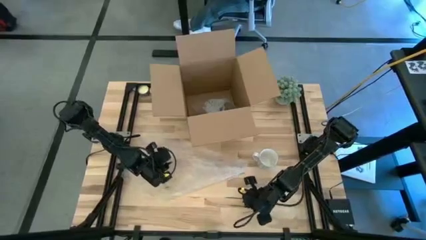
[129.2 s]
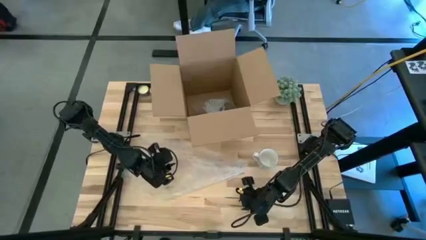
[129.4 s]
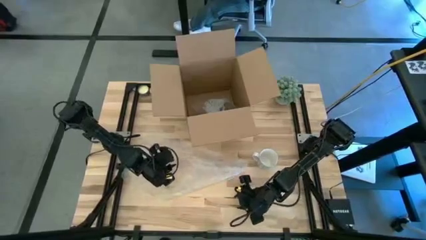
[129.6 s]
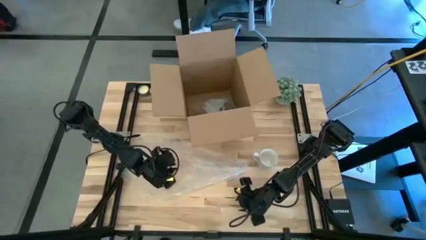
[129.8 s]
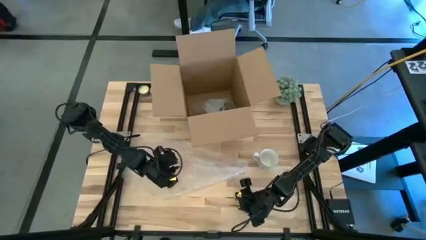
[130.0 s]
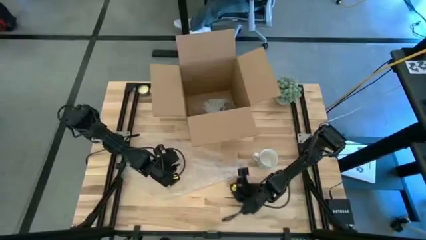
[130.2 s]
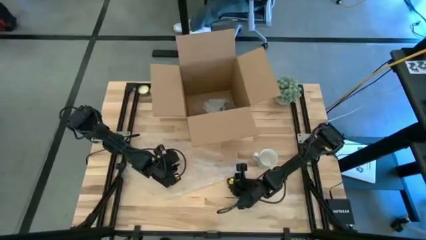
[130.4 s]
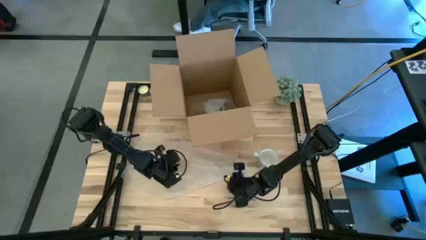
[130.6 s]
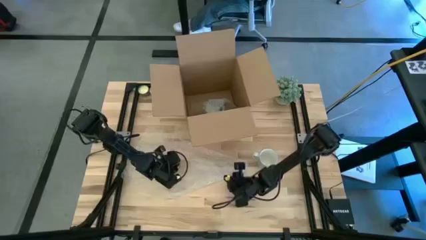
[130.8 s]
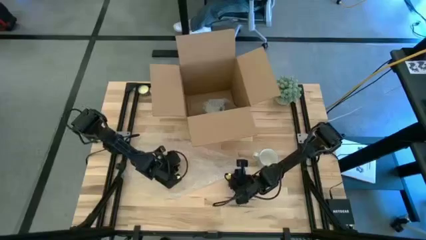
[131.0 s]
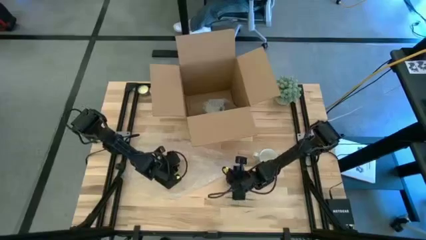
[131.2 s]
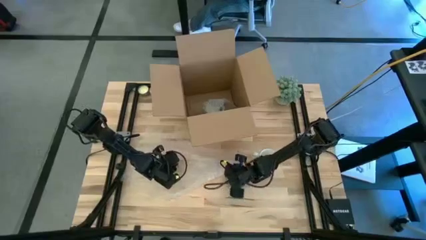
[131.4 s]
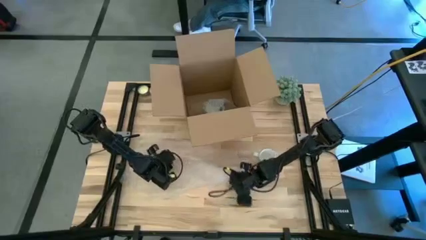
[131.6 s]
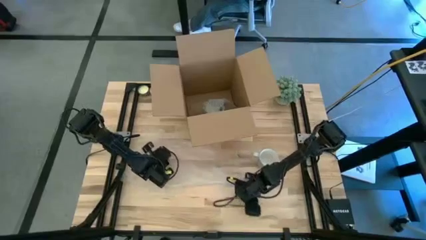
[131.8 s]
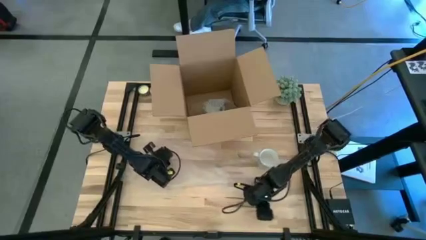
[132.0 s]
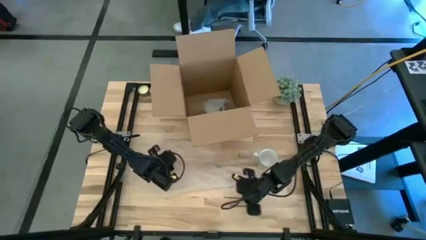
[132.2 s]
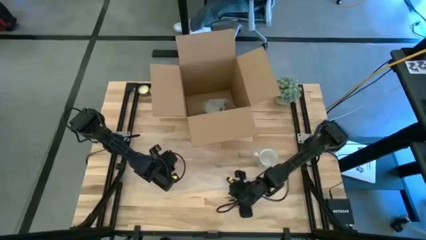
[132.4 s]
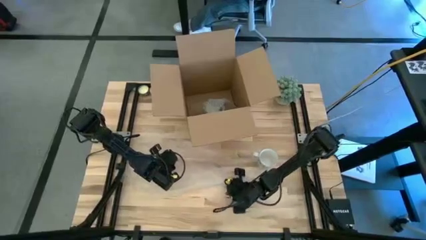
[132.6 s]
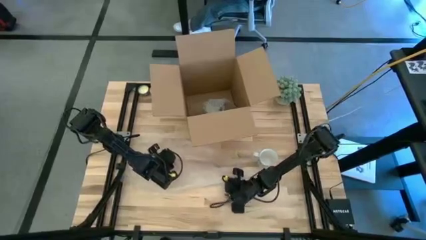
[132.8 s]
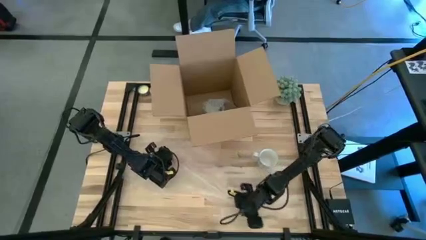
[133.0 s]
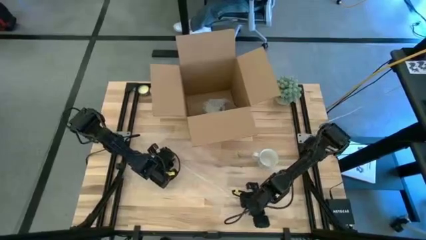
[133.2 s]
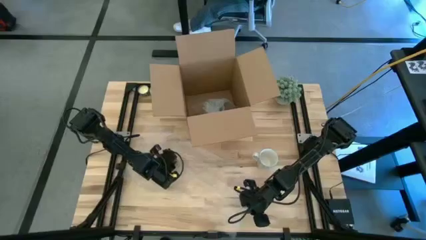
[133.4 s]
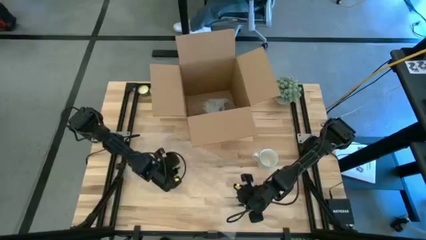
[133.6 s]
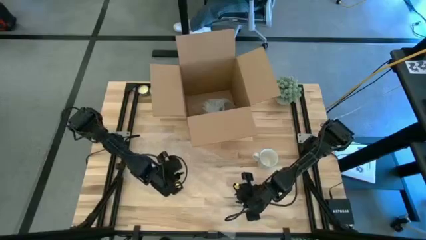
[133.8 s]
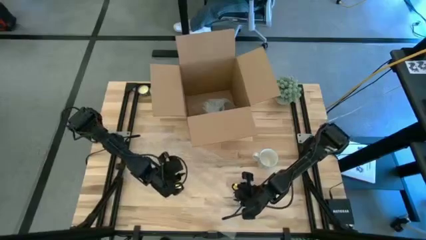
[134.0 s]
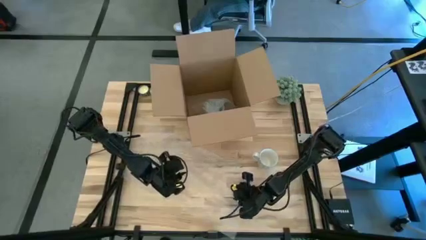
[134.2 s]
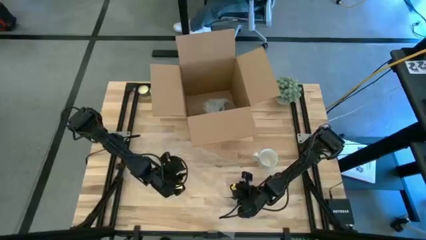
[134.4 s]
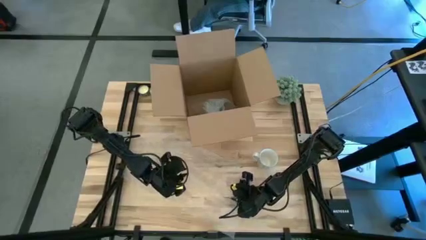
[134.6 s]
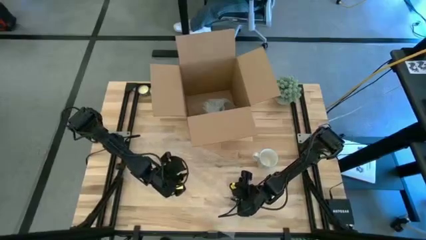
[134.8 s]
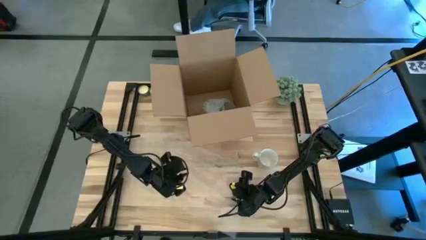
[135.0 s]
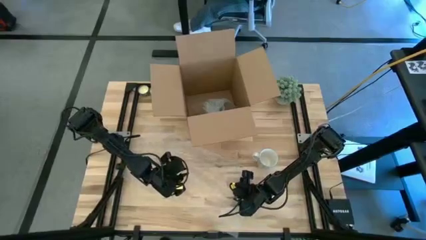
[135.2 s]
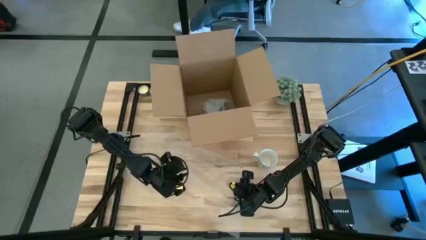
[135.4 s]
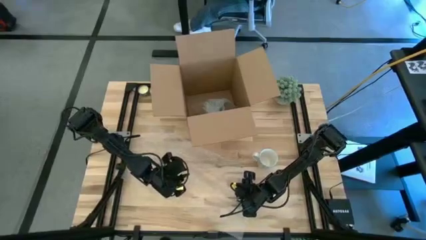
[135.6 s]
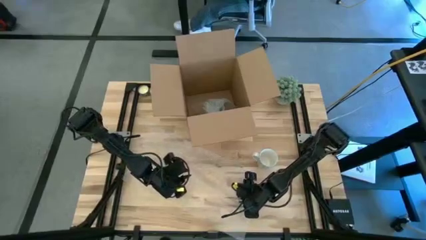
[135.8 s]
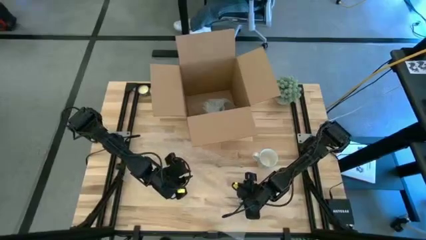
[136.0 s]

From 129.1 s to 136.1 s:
Task: wrap mug
Prepare the transparent bubble wrap

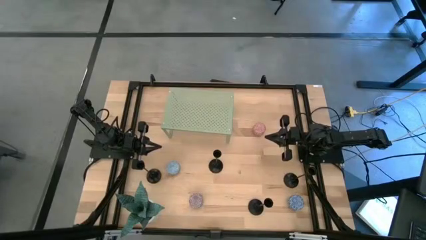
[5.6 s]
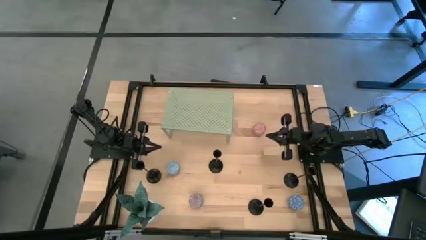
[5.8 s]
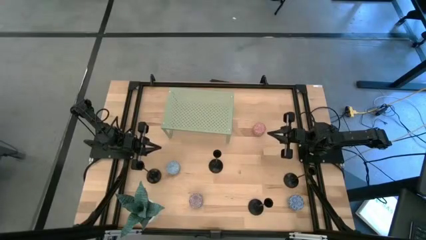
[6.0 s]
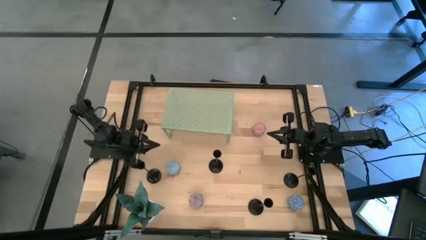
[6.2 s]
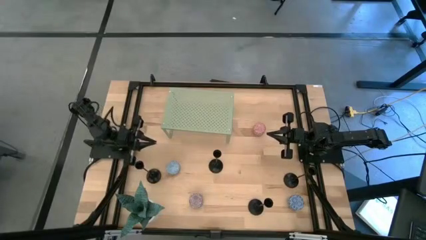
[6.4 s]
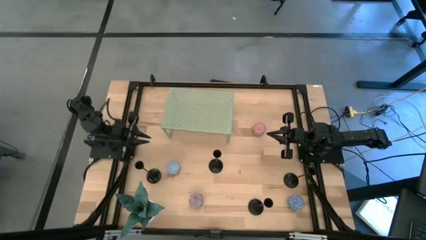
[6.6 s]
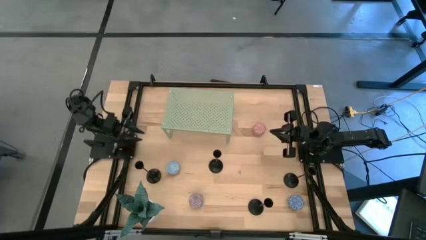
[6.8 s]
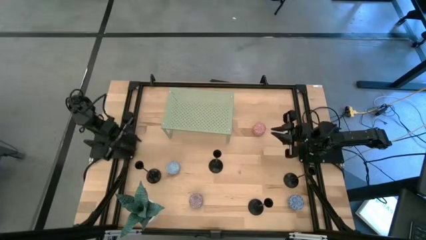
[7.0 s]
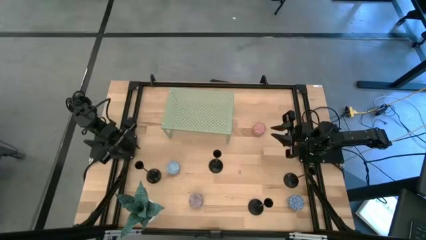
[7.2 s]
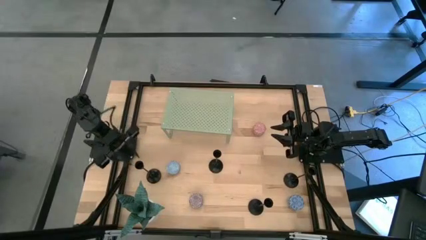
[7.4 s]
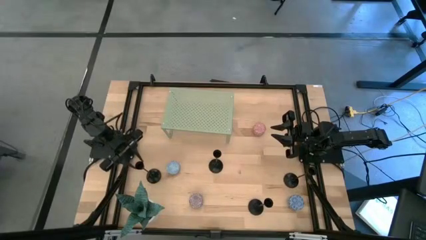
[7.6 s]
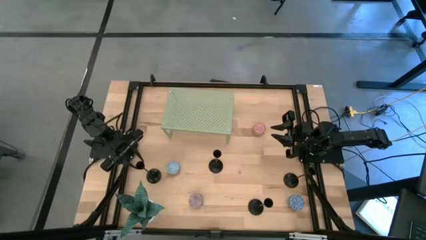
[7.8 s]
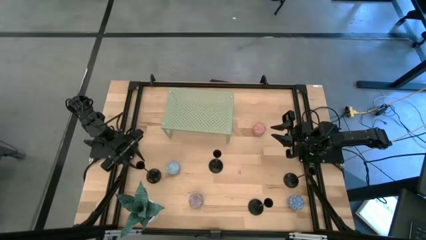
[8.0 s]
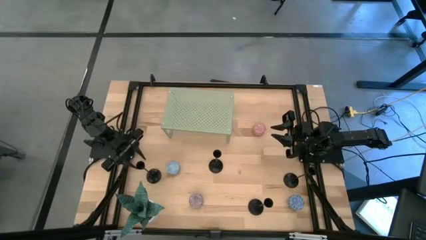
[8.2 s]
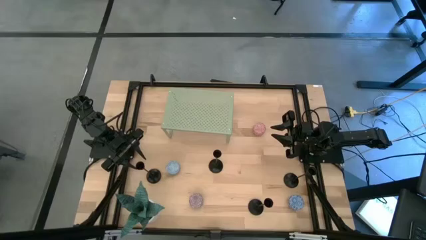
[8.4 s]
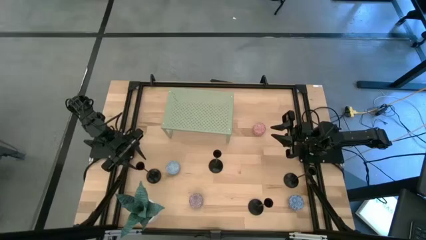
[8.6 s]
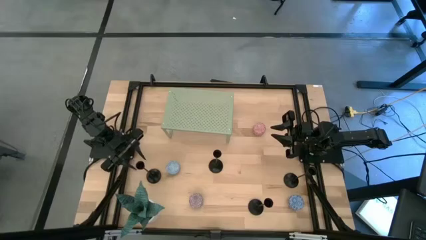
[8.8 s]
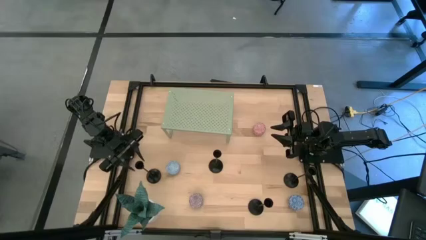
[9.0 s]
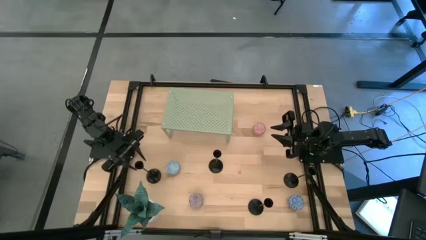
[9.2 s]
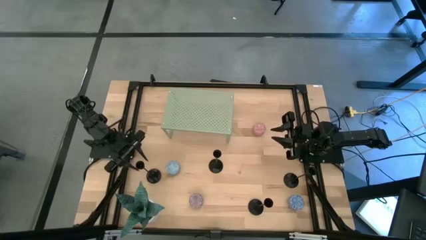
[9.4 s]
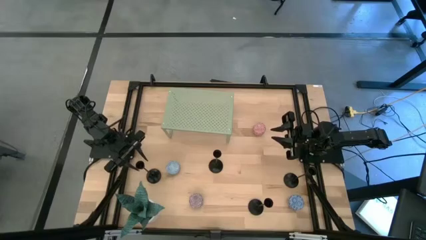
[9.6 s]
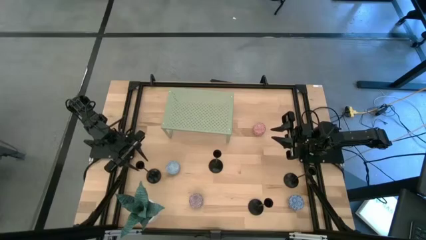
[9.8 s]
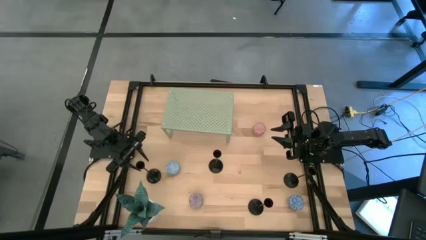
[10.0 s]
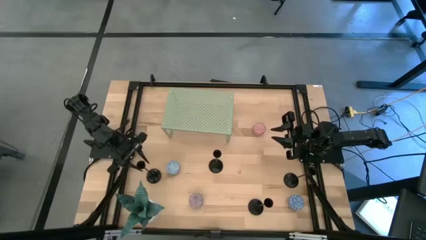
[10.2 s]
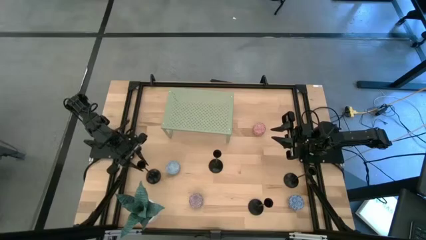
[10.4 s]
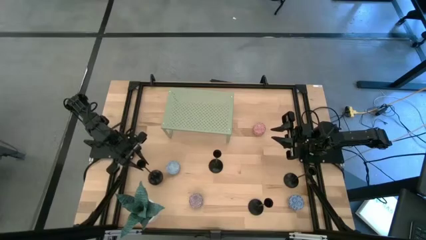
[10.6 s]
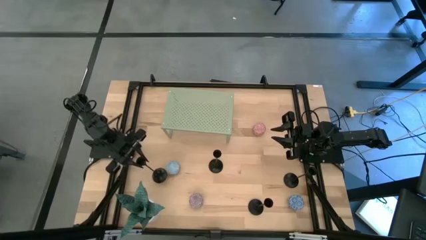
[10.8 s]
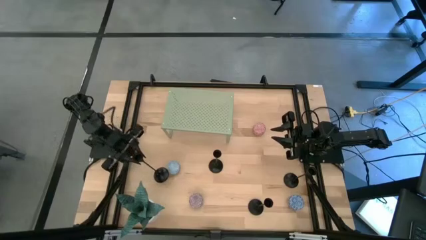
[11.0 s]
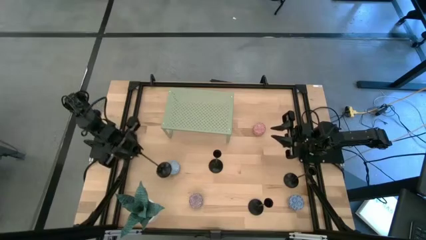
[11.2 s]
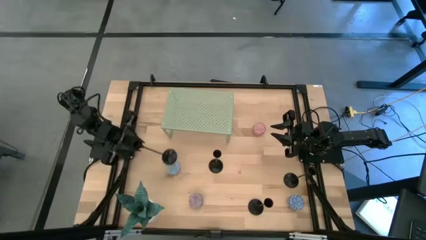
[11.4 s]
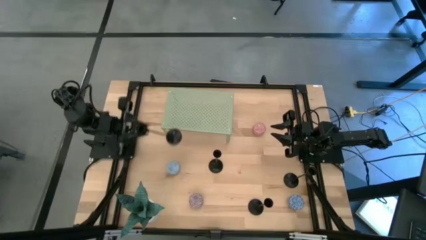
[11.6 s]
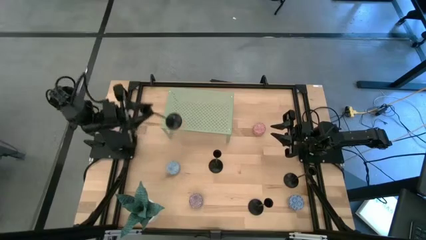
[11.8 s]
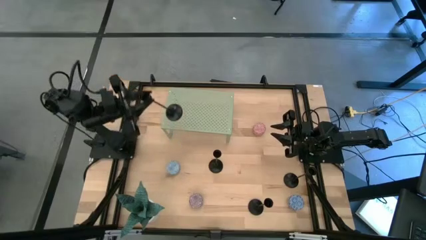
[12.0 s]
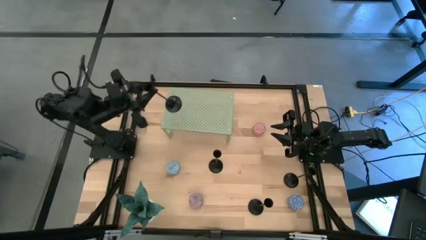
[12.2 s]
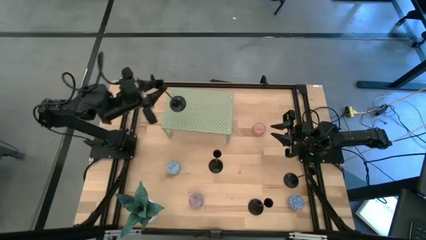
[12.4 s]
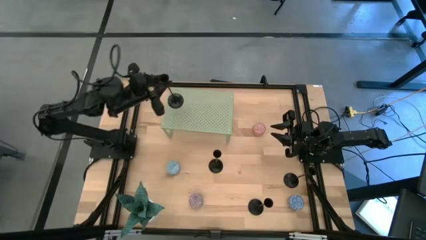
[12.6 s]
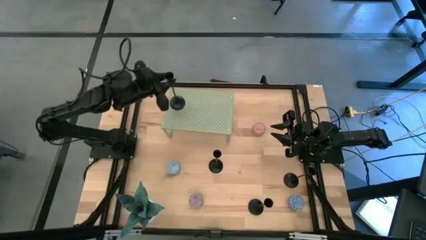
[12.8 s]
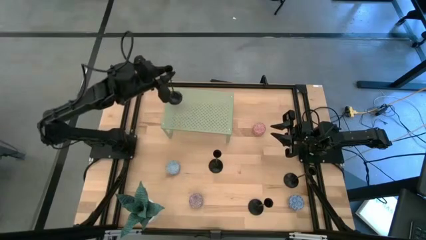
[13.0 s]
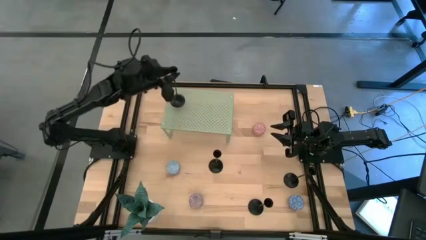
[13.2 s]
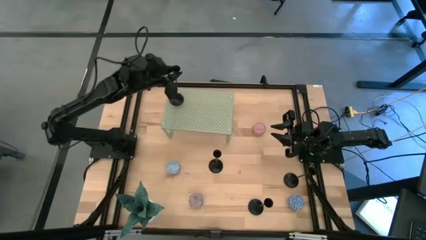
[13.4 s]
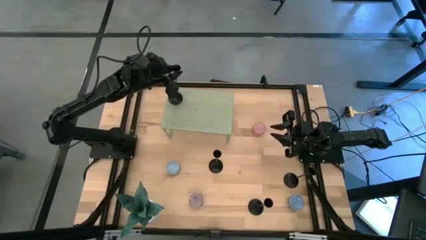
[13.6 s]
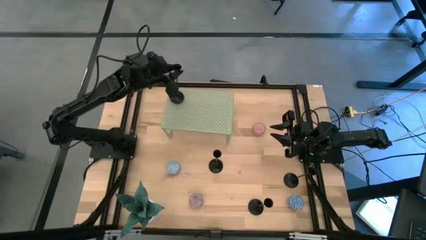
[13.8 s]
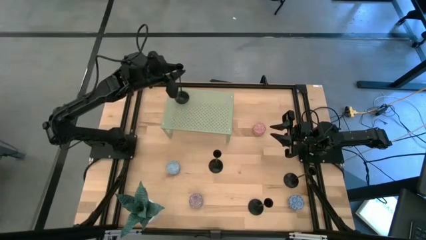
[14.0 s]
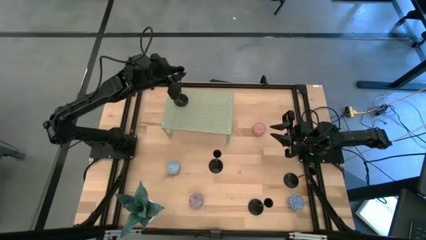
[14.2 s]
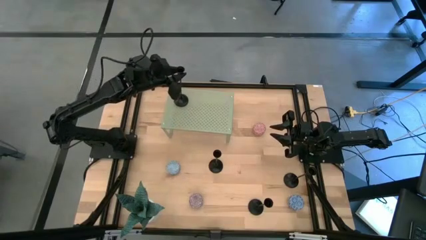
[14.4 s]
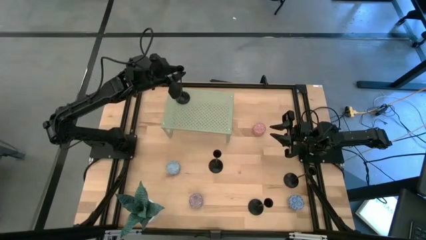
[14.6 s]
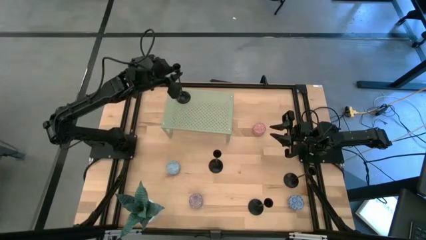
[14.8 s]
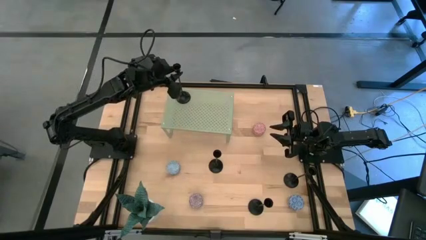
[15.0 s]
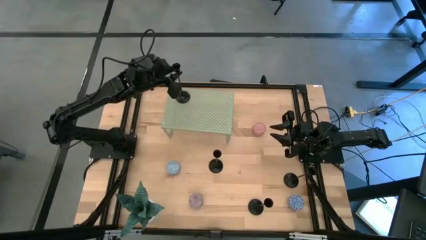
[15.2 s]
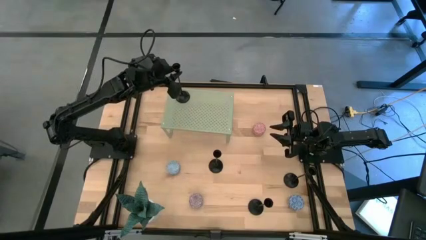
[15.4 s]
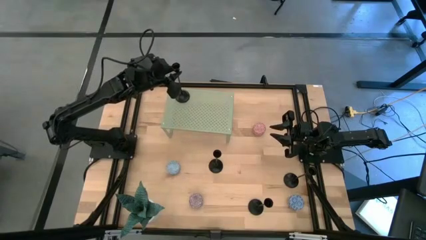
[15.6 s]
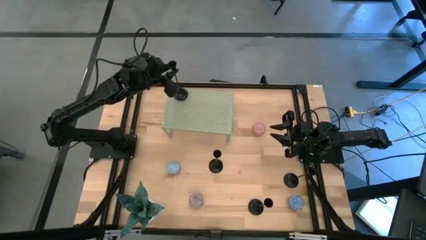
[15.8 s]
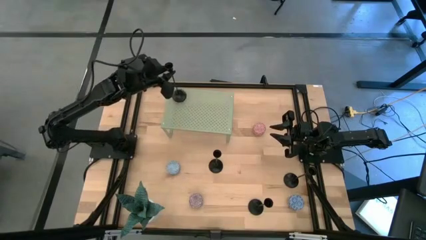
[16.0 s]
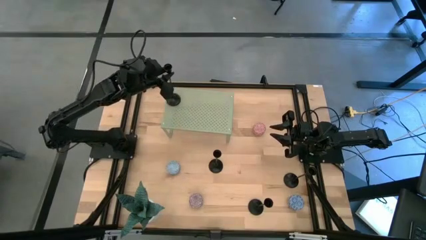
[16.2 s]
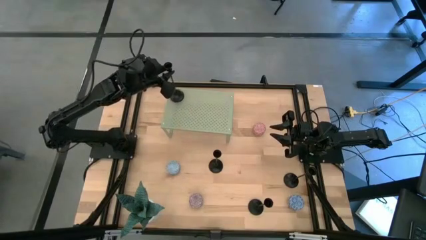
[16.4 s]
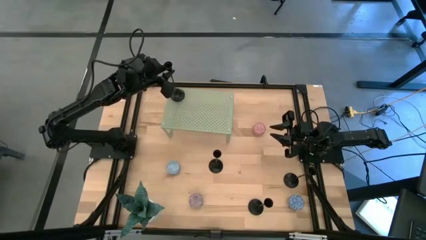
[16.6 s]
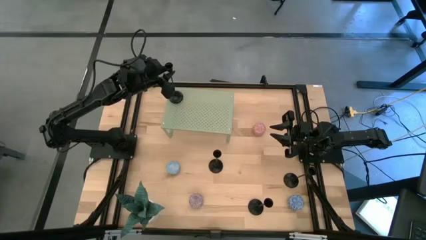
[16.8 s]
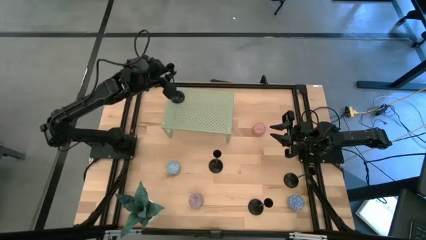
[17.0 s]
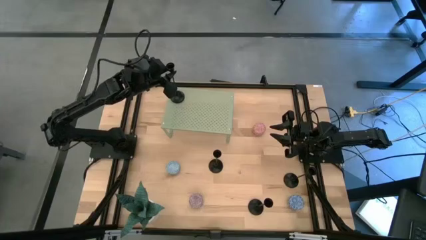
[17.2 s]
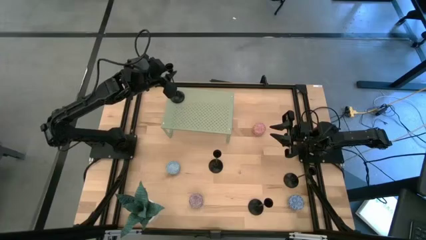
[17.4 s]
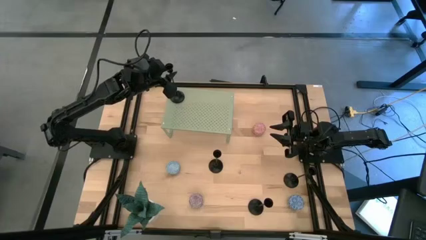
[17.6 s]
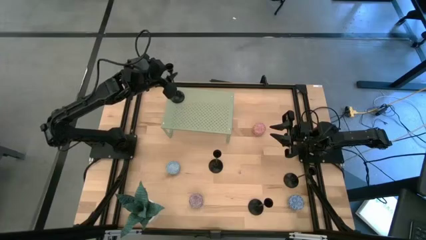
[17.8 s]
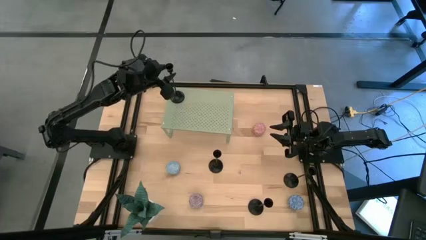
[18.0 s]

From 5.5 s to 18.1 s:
Task: Pick & Place candle stick holders
Put the middle left black candle holder on the shelf
